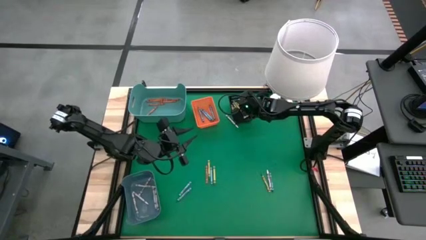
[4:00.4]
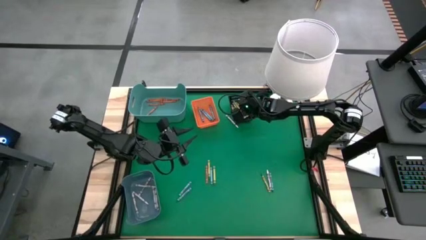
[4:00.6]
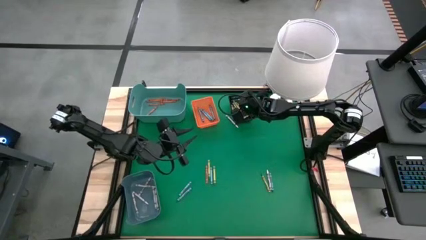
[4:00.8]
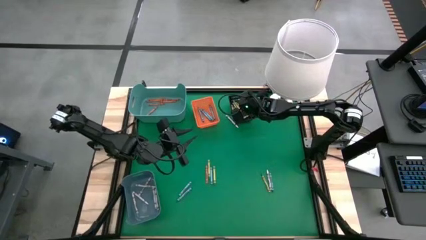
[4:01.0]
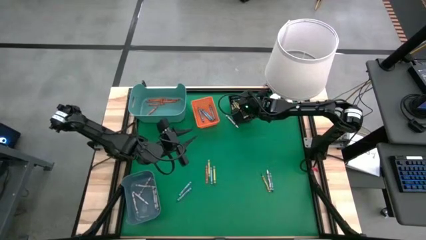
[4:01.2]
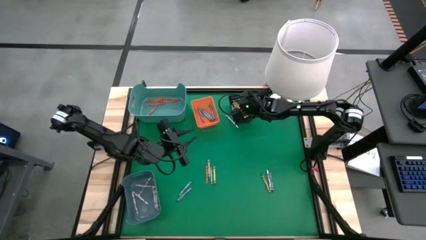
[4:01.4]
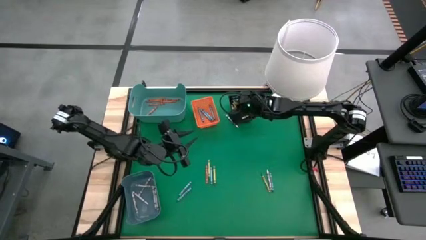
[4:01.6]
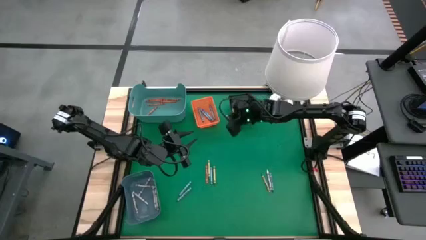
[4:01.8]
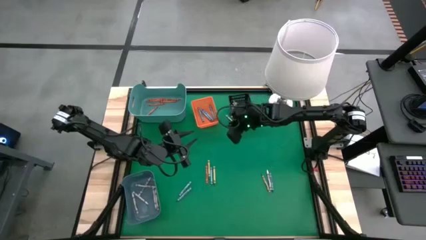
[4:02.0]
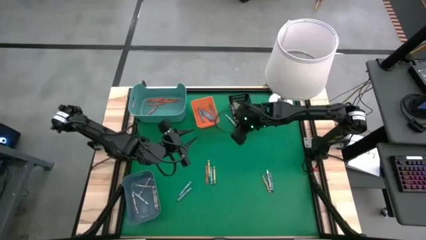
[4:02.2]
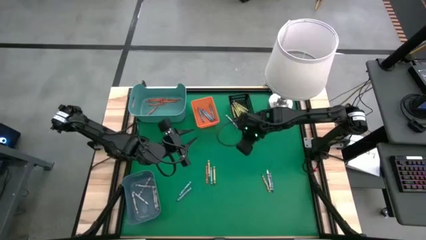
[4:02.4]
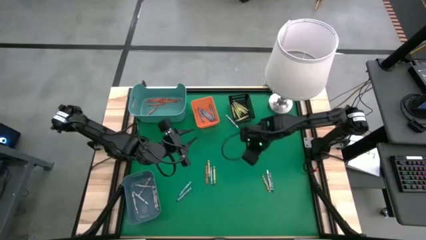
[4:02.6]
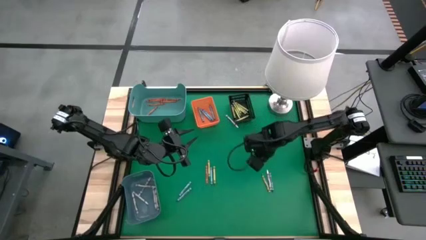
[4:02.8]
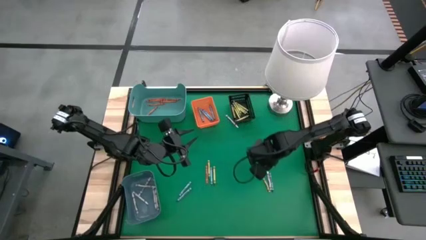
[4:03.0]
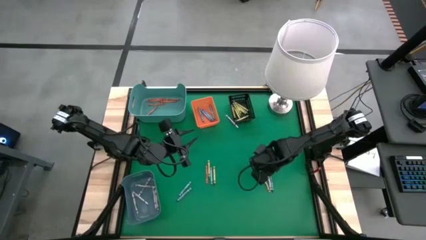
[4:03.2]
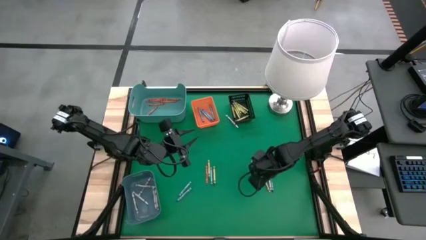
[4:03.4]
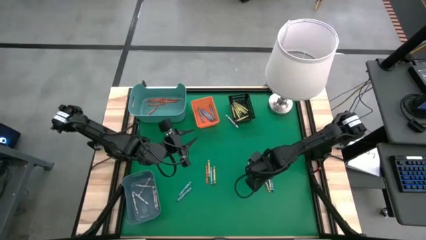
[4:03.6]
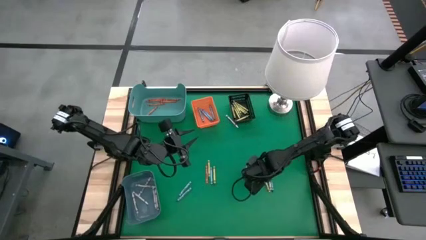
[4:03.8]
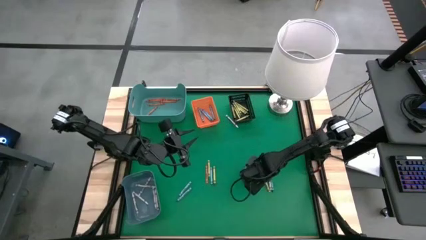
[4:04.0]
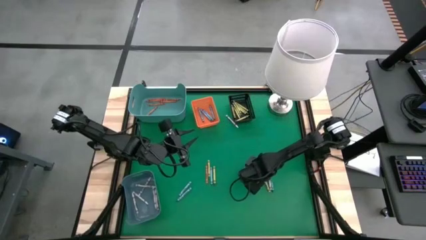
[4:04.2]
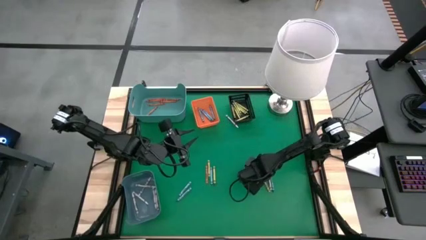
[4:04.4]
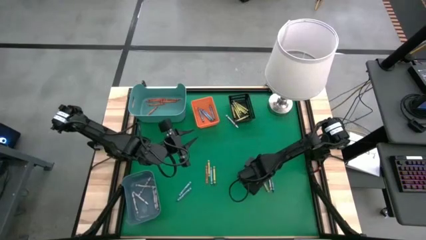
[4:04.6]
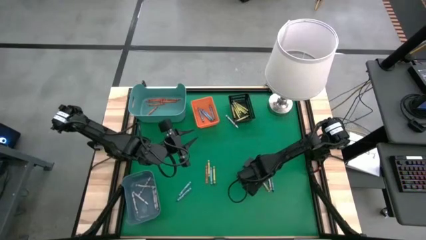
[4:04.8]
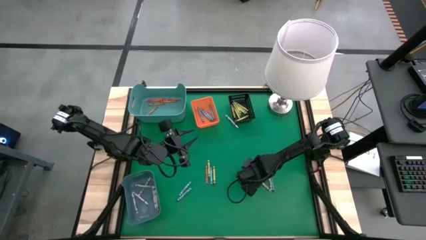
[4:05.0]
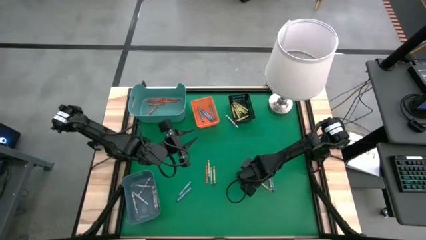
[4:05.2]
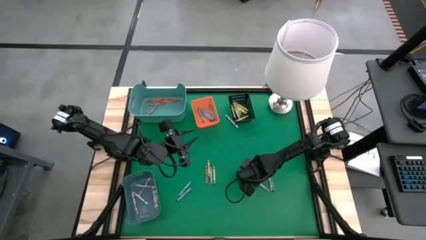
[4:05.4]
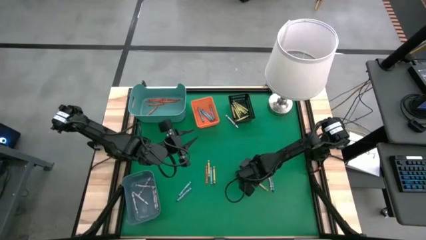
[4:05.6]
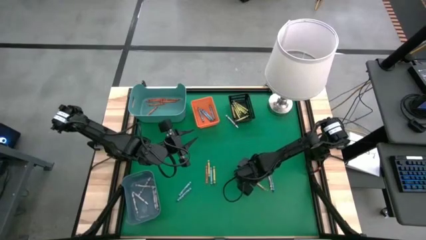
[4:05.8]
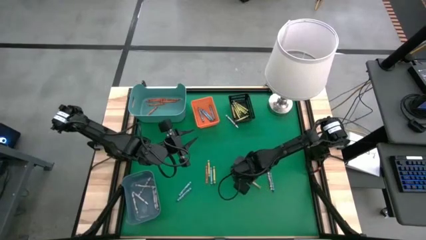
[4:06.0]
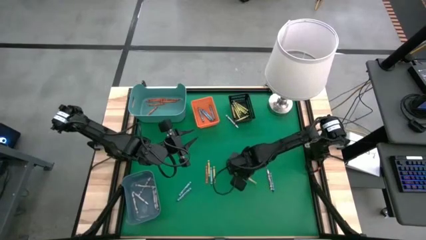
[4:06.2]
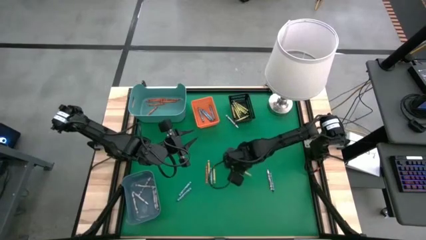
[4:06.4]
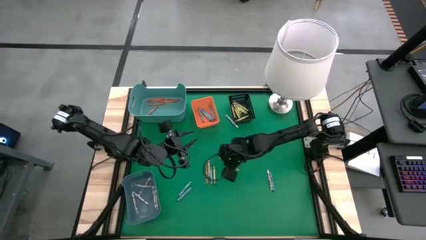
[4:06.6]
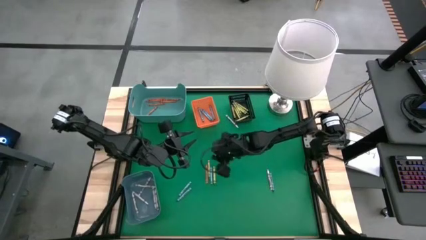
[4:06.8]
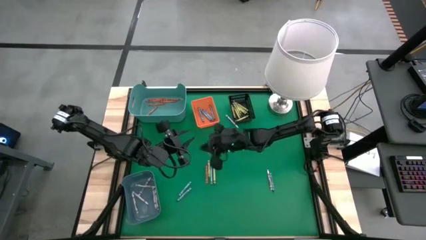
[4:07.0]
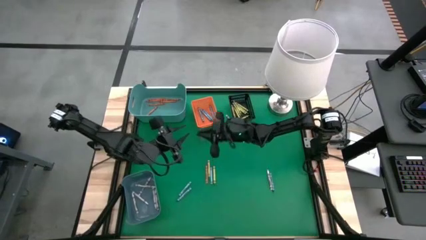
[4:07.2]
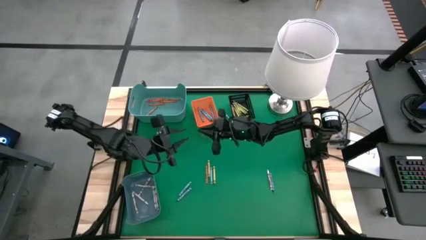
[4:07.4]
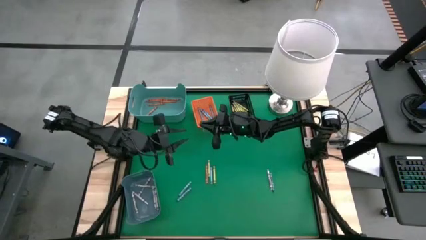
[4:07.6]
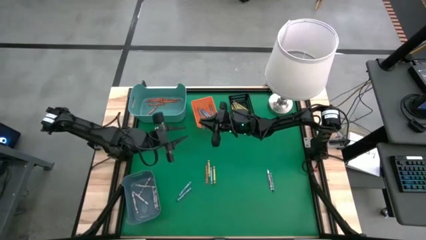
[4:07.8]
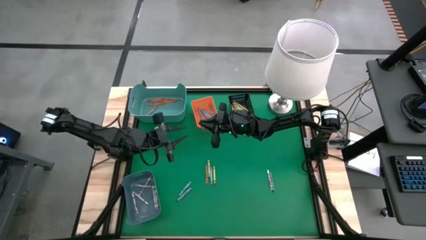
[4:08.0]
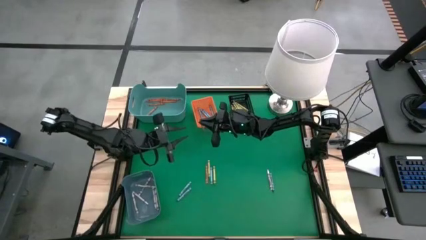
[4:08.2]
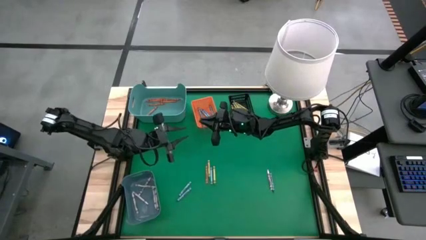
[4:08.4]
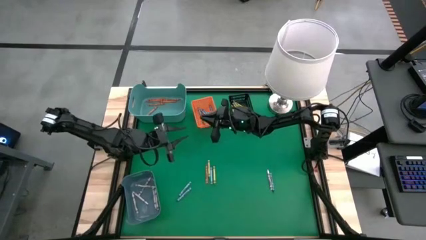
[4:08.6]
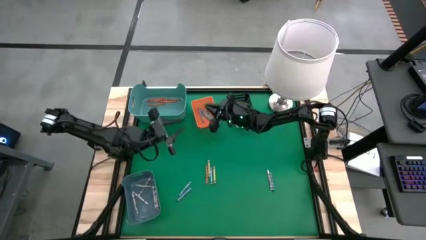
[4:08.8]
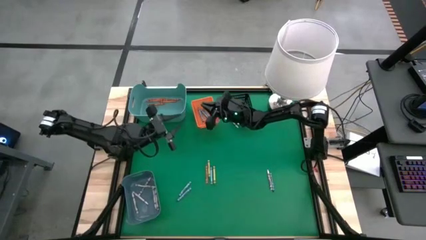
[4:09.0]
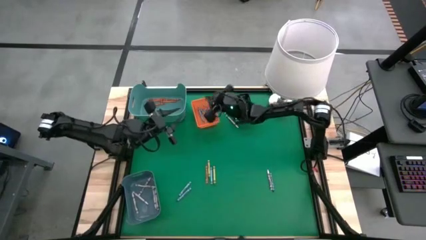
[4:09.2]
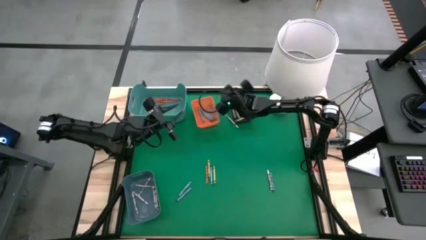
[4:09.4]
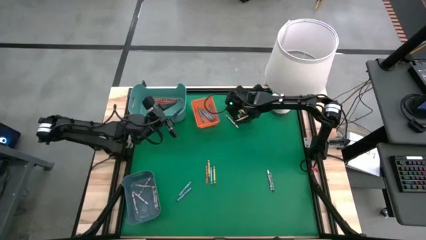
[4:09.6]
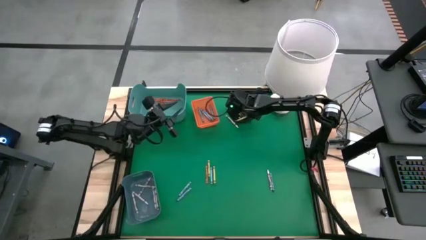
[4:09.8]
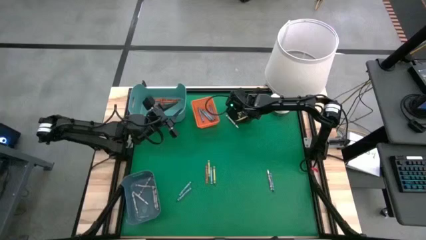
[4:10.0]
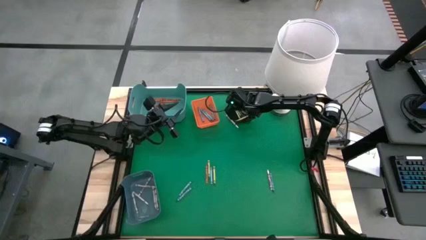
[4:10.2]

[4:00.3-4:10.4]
Task: Sort crayons
Put the green crayon into the black bin

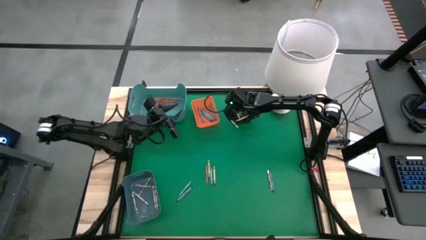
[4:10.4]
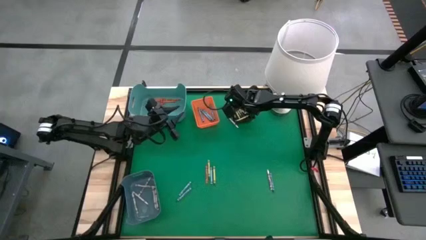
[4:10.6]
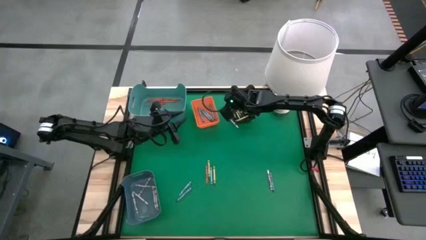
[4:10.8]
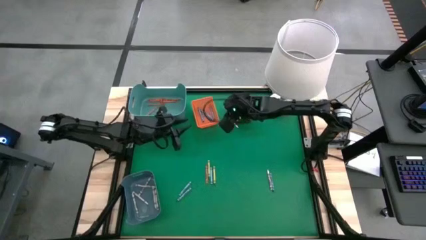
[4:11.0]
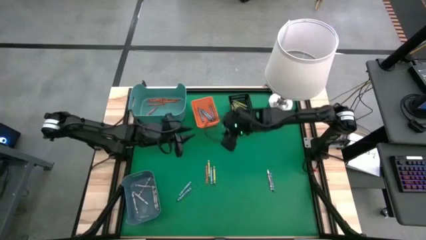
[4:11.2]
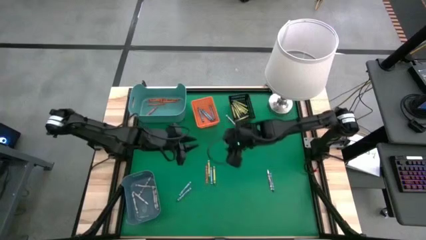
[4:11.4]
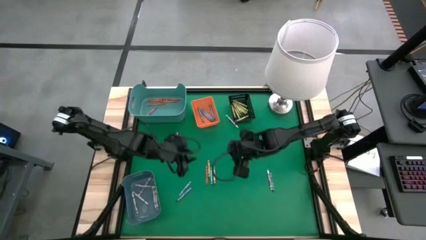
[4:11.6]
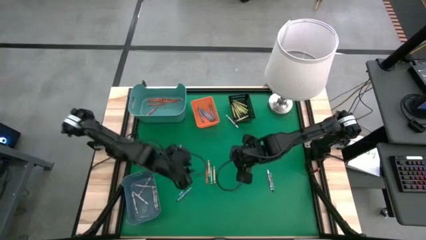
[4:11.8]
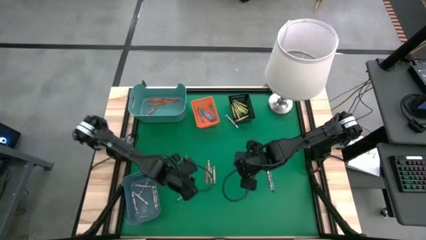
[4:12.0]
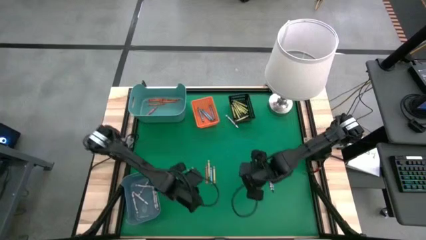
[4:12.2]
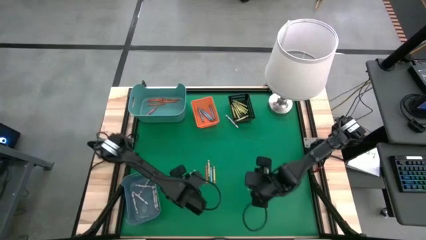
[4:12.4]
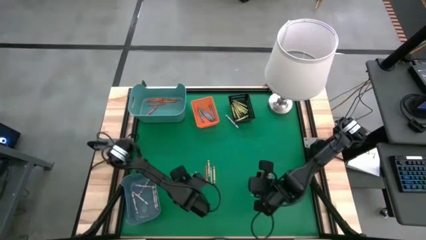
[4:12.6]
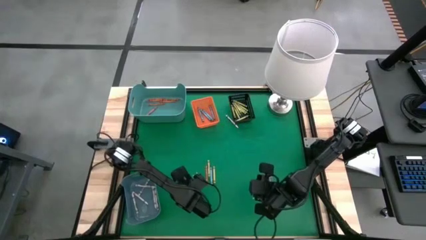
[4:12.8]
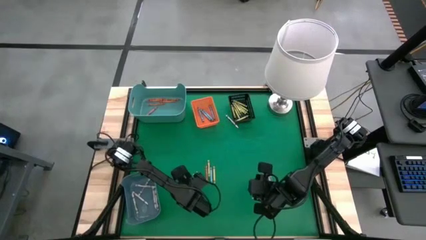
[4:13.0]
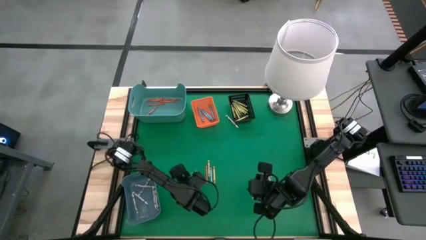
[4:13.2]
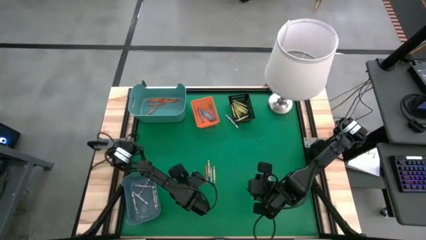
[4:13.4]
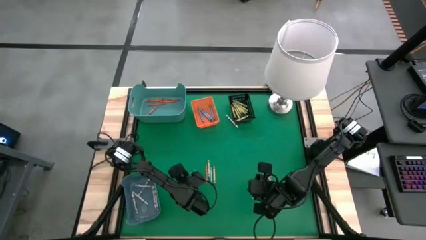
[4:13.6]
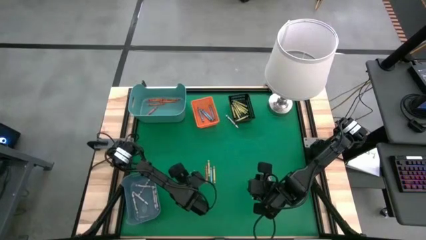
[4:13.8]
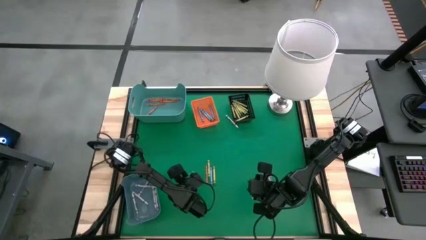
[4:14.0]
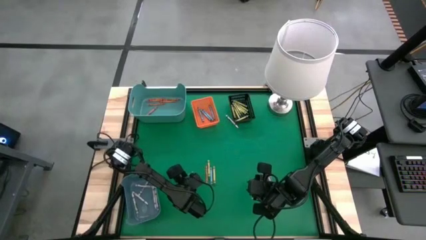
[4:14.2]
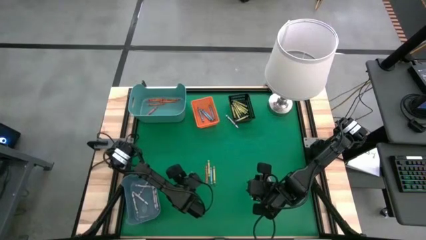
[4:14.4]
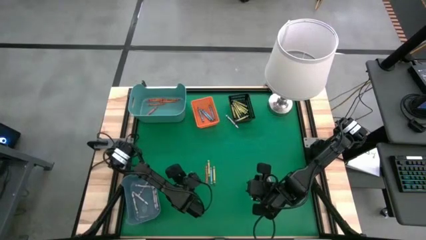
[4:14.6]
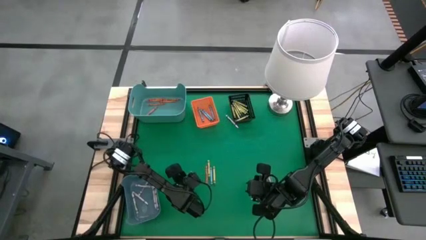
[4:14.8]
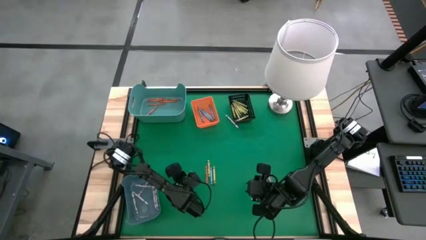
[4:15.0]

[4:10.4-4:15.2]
Put the blue crayon into the orange bin
